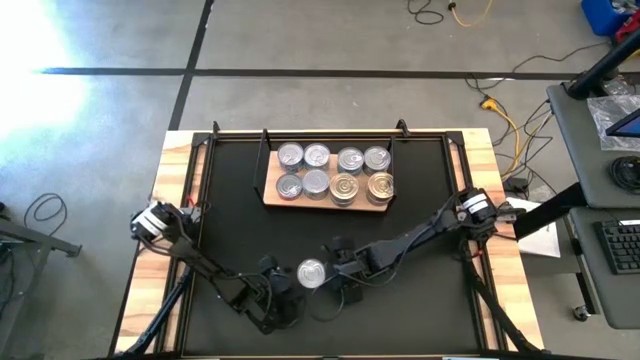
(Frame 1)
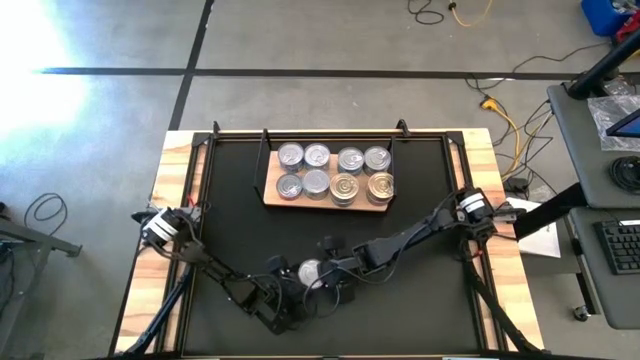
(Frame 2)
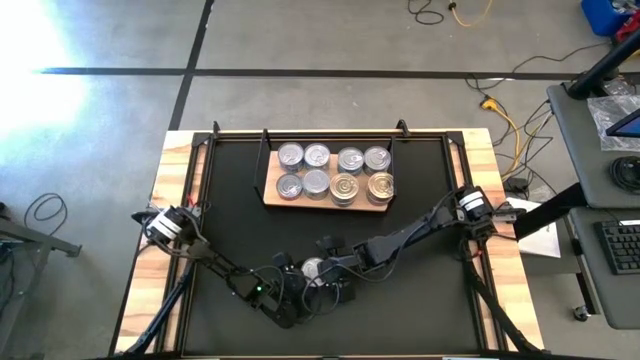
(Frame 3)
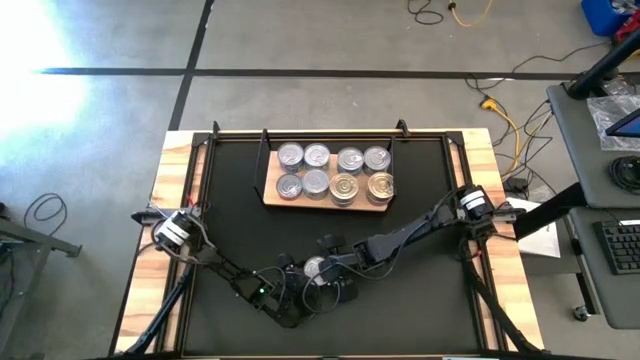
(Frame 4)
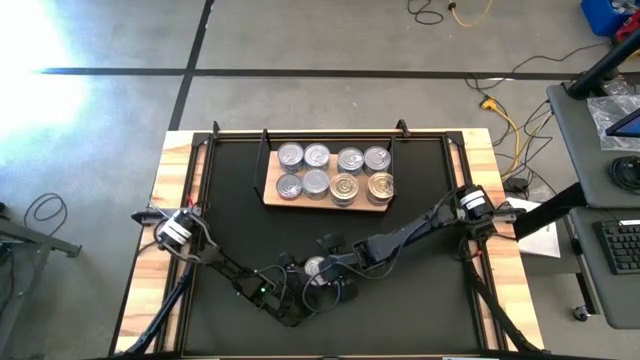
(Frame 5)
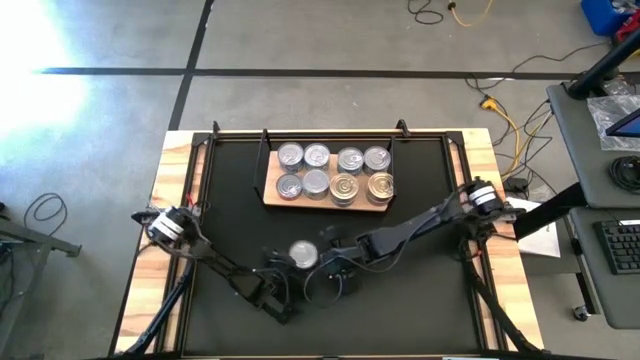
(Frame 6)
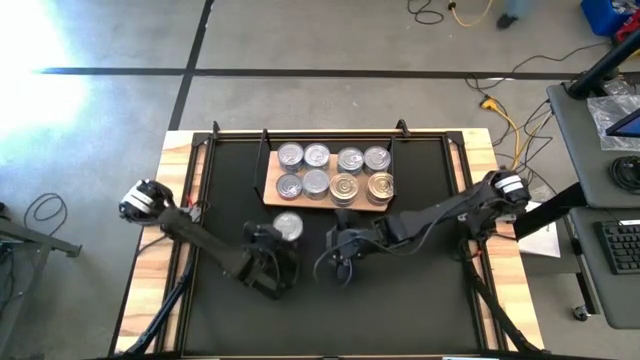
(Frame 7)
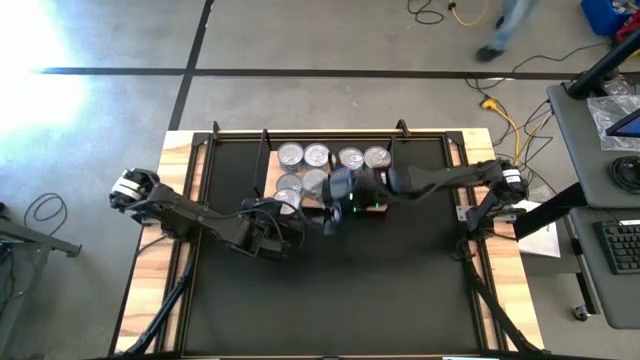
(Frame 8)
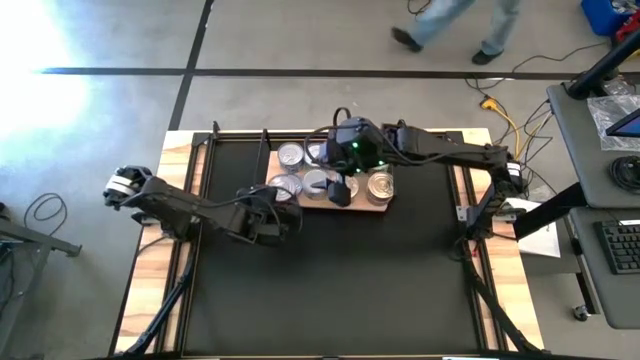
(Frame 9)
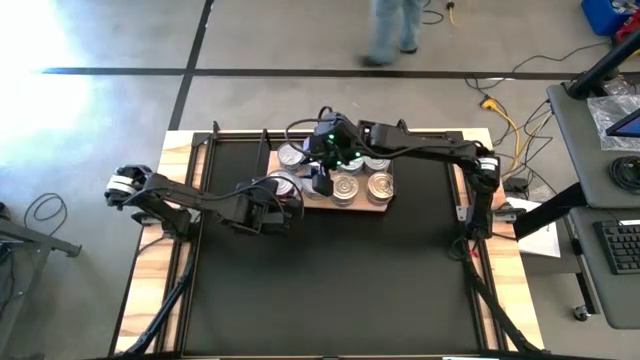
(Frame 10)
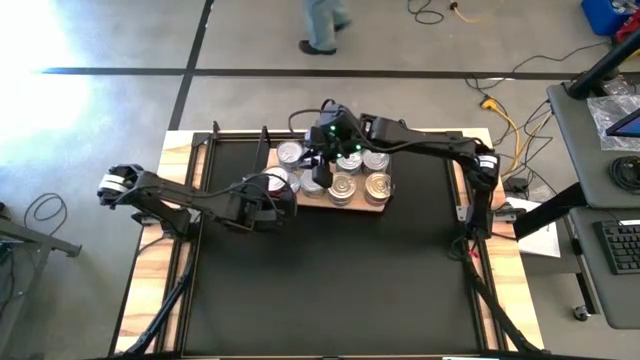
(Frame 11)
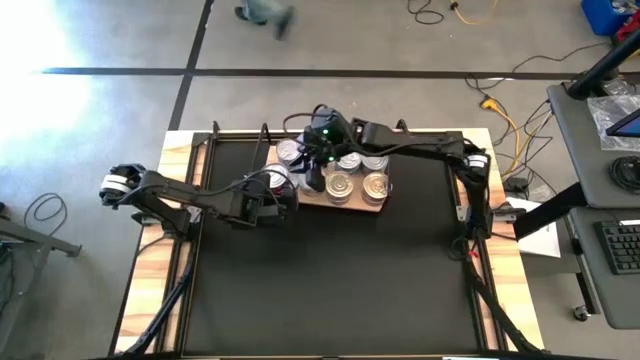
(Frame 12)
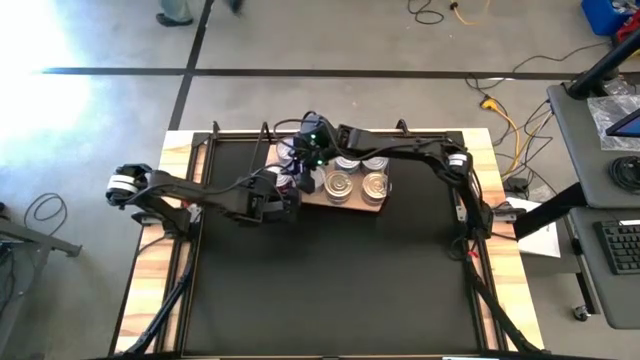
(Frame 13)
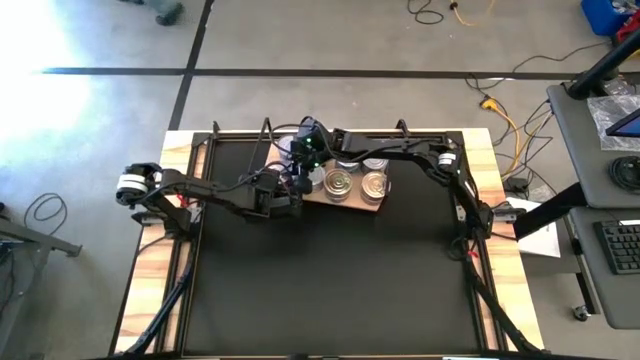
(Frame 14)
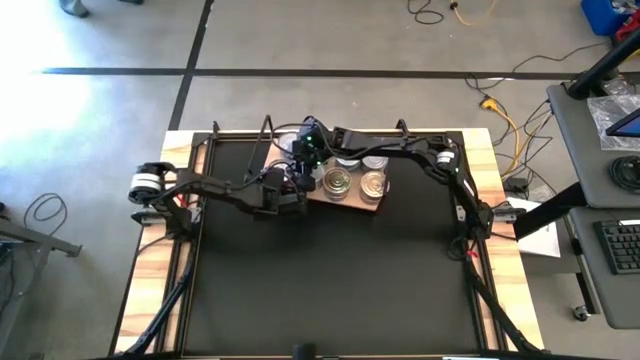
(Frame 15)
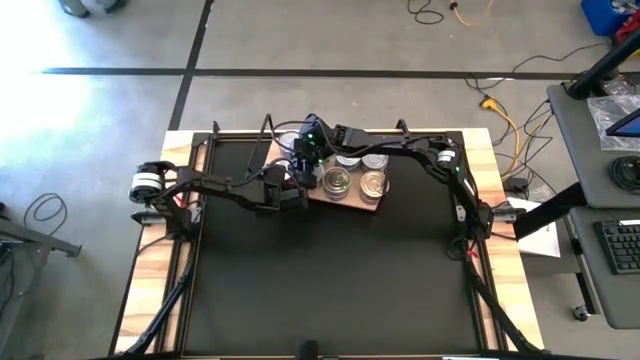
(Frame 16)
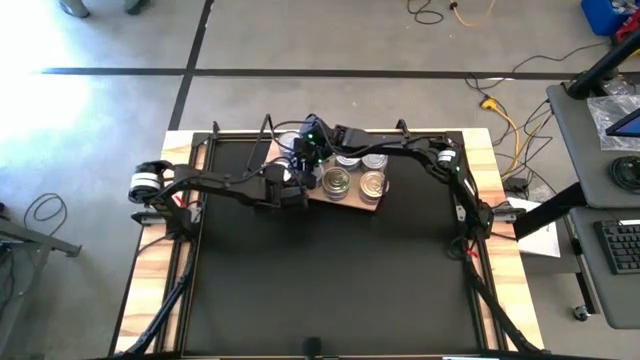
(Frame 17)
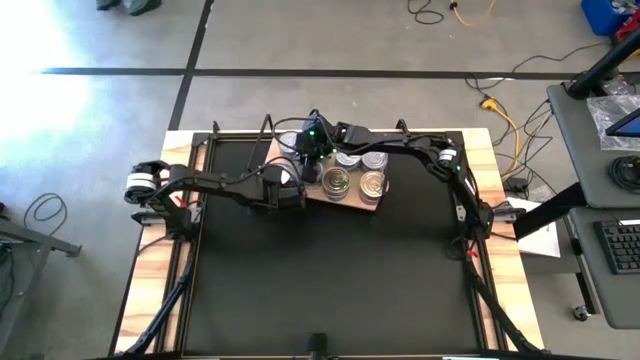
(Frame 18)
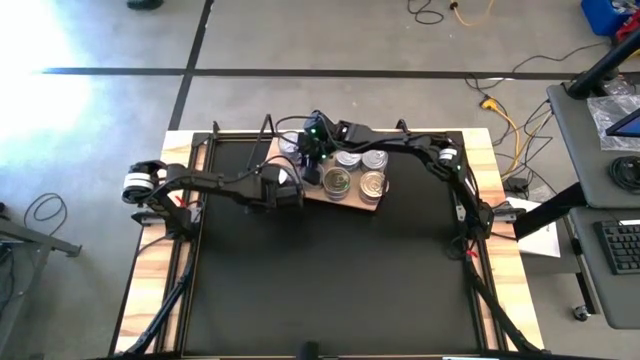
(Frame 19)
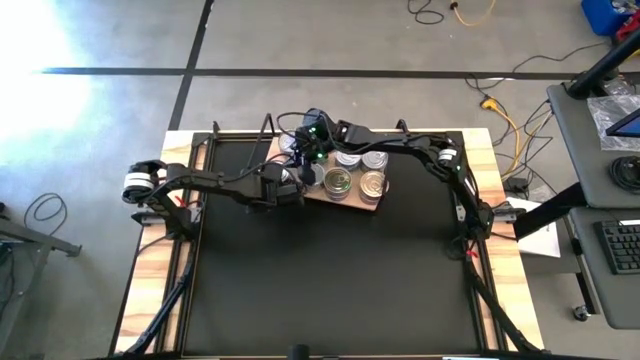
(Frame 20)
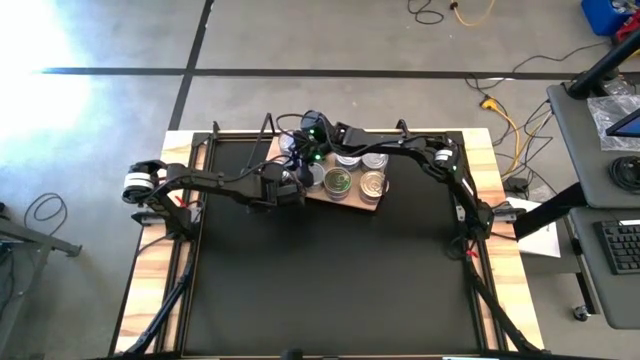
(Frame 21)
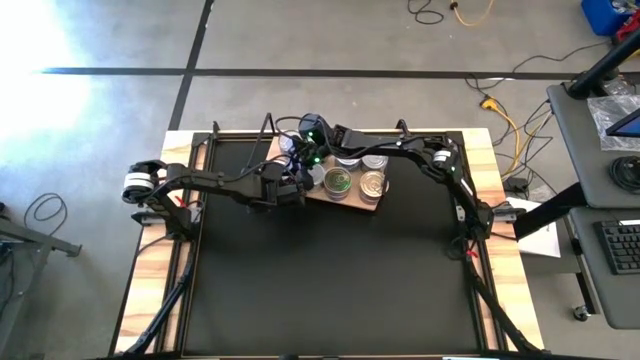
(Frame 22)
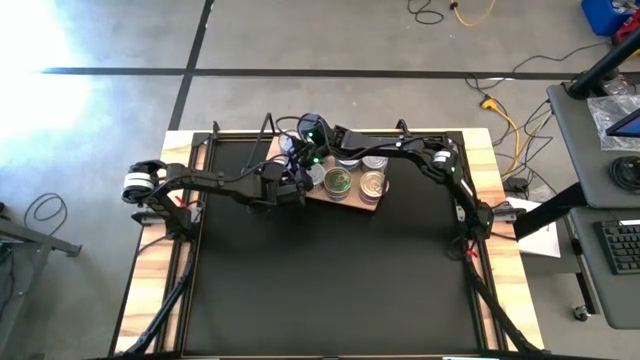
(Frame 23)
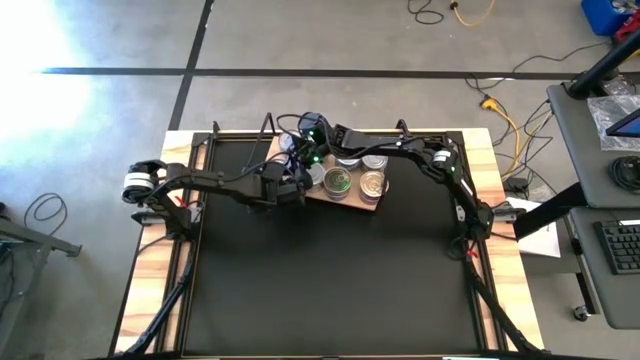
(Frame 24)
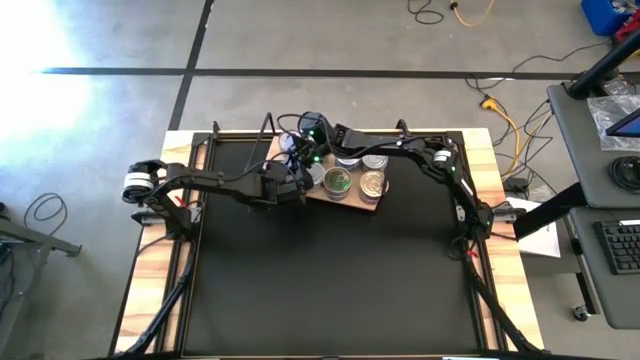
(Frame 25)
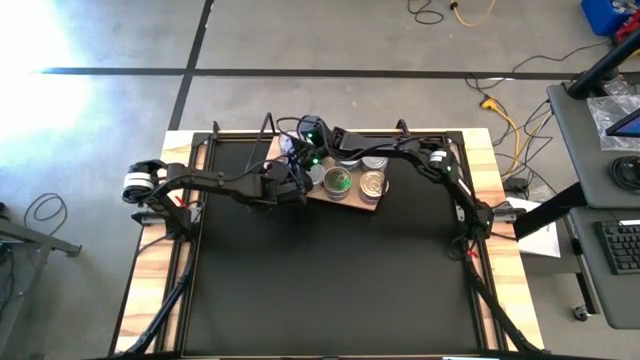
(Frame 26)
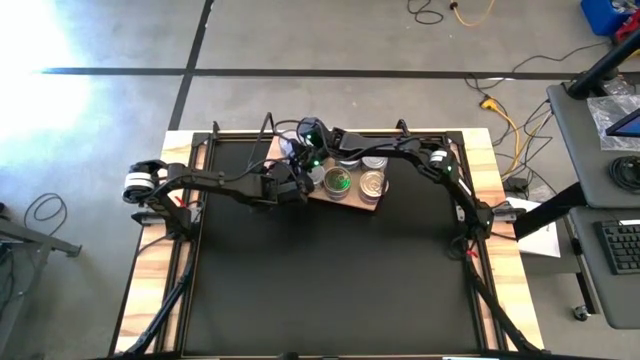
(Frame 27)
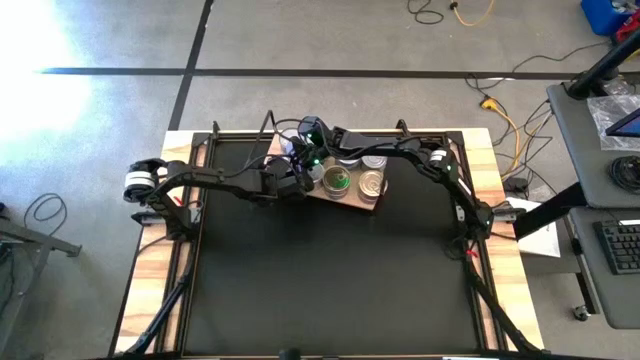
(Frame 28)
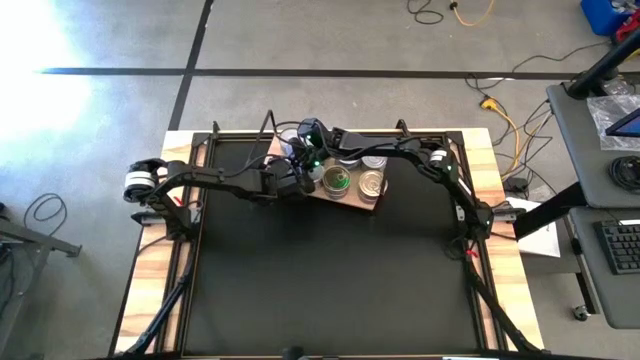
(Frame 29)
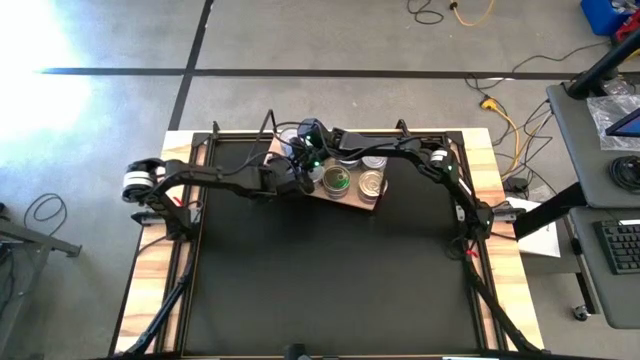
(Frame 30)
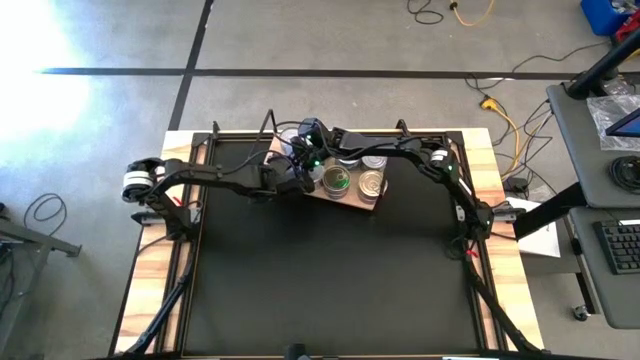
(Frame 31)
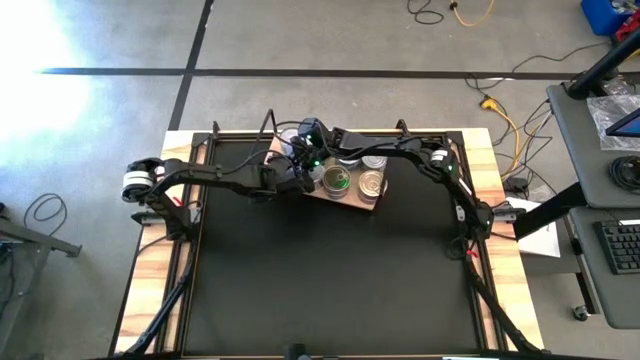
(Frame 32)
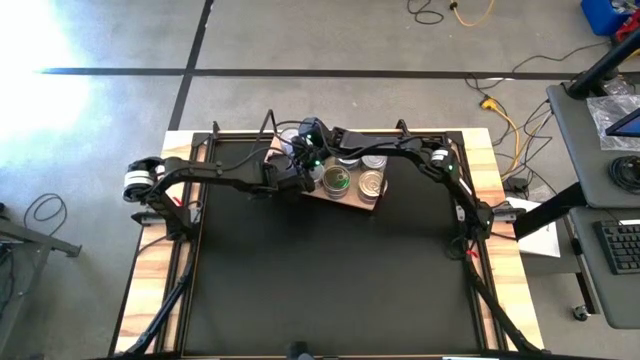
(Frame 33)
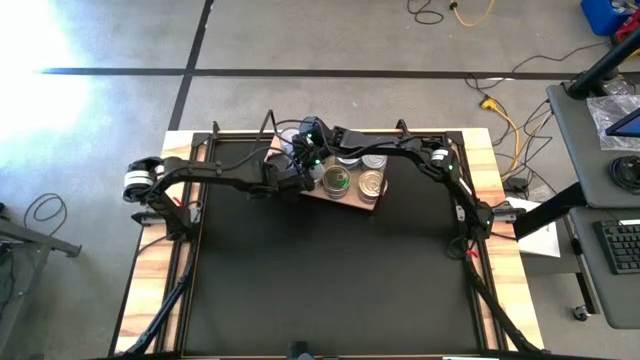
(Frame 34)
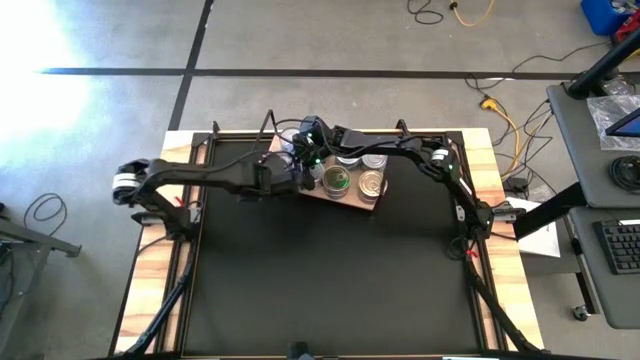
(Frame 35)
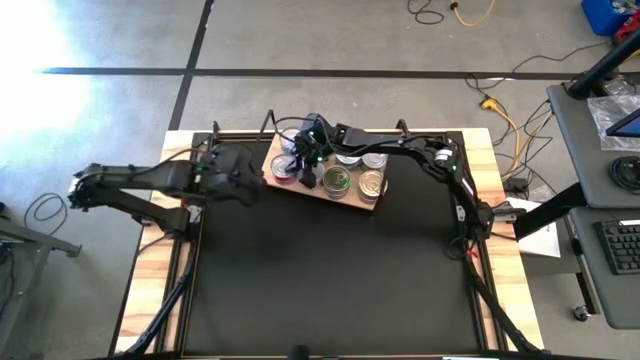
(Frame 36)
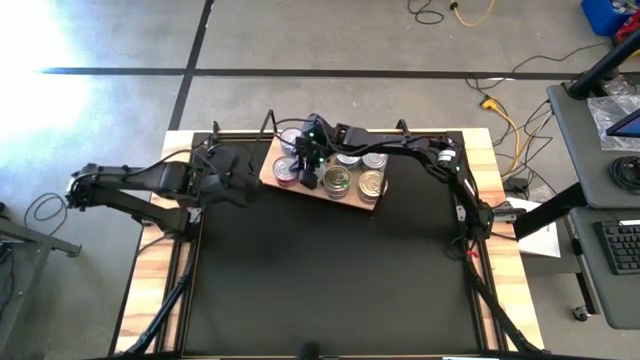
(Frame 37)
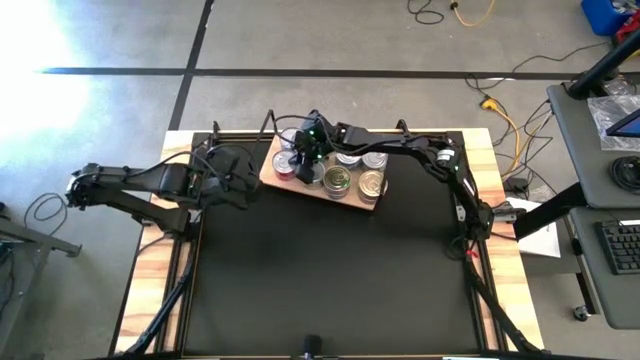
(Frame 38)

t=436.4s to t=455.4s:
Task: Stack canned seafood by type on shelf
Stack the red tuna can on the red tuna can

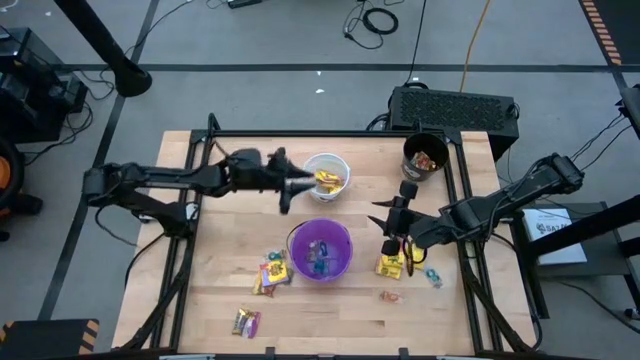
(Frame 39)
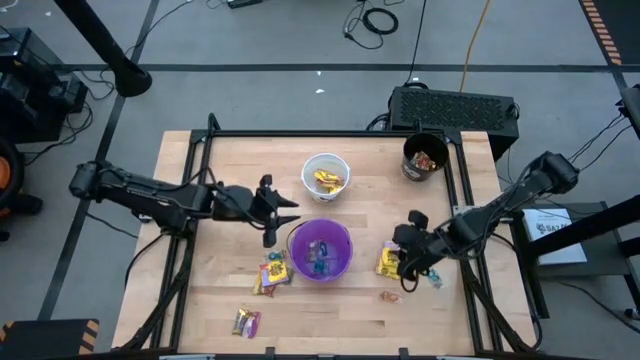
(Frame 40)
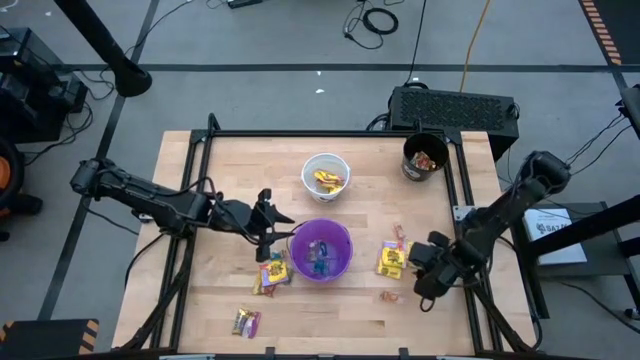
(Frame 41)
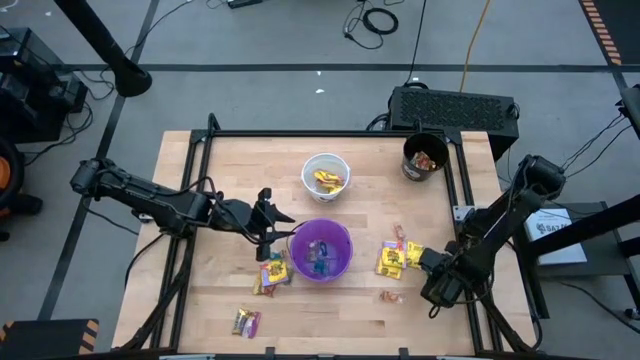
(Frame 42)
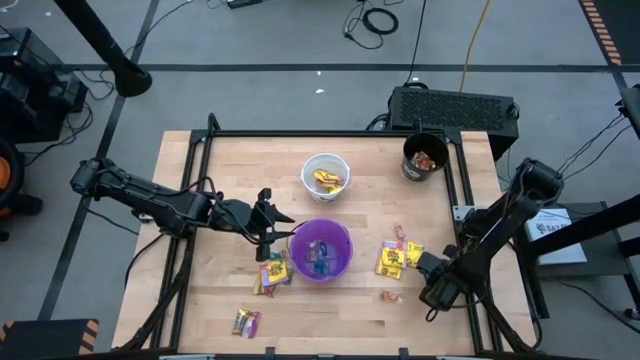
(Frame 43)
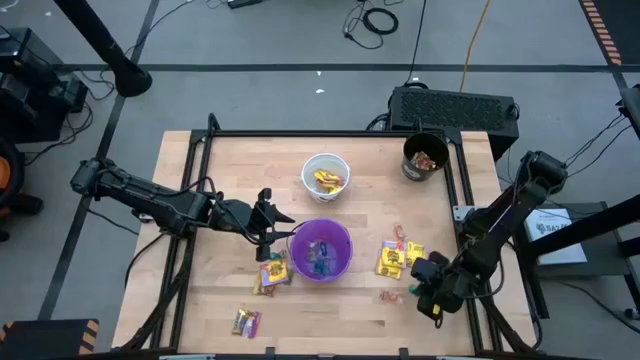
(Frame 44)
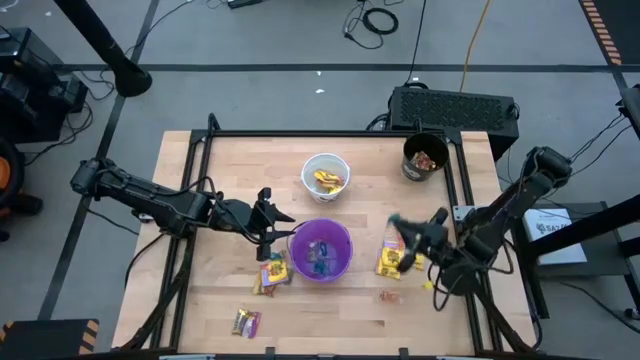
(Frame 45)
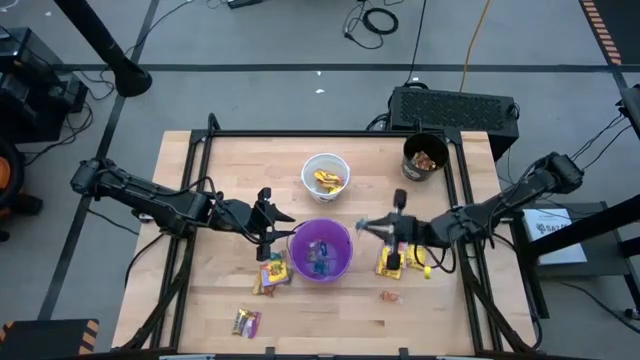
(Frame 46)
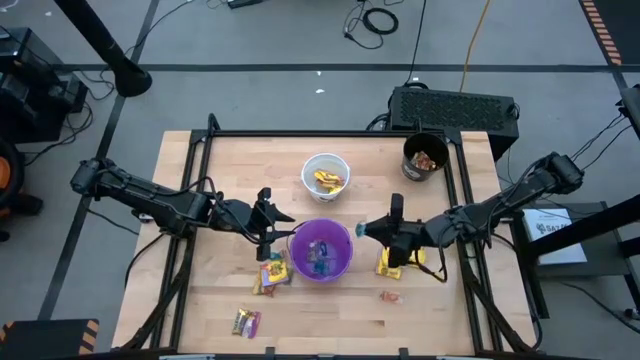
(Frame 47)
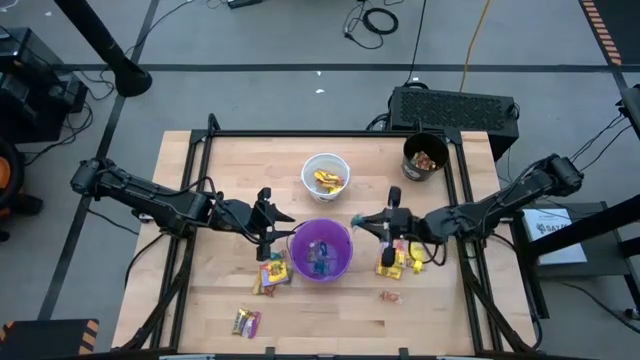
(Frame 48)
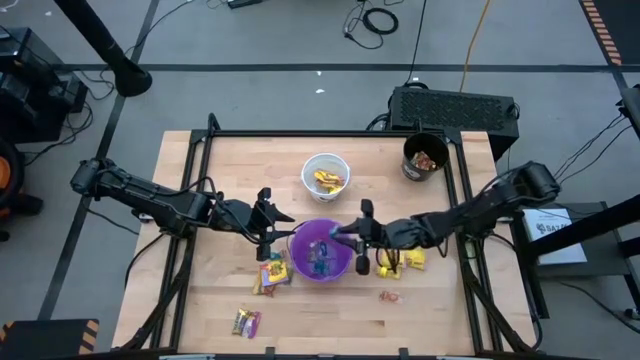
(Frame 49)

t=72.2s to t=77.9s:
Task: Sort candy by brand, put in halloween buckets
Put the blue gummy into the violet bucket
